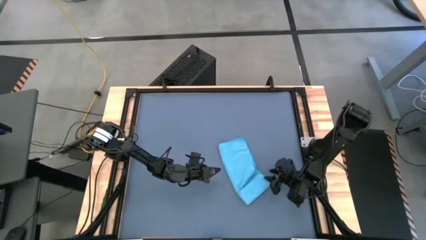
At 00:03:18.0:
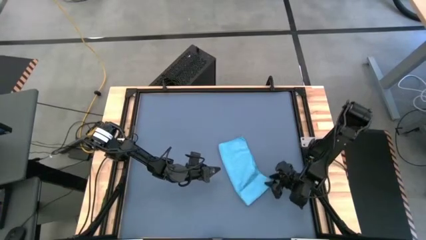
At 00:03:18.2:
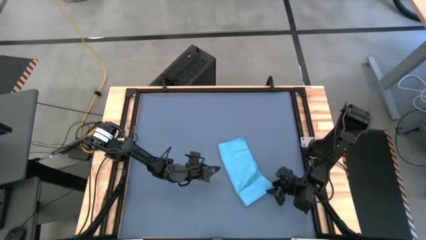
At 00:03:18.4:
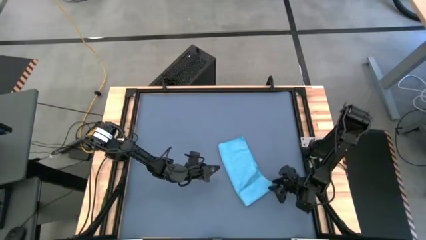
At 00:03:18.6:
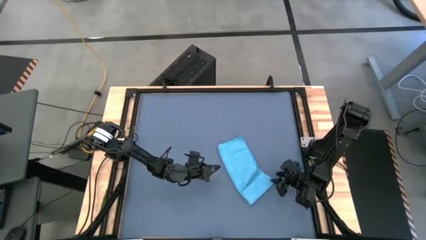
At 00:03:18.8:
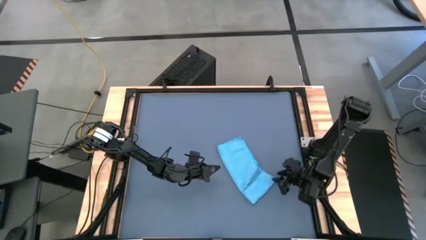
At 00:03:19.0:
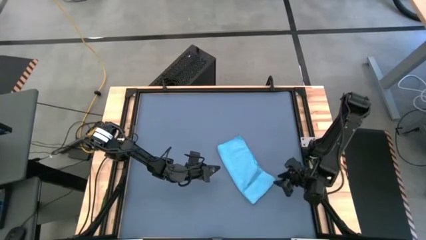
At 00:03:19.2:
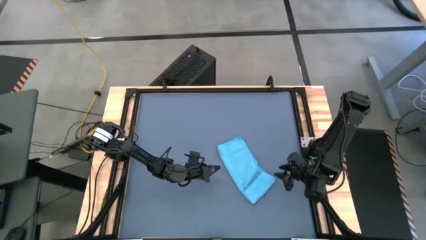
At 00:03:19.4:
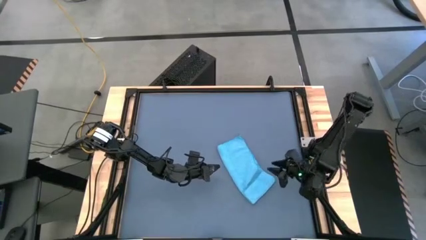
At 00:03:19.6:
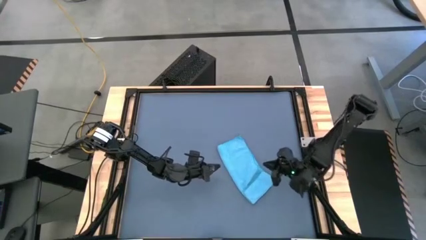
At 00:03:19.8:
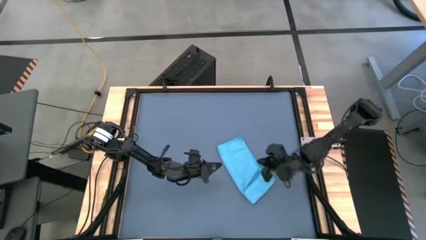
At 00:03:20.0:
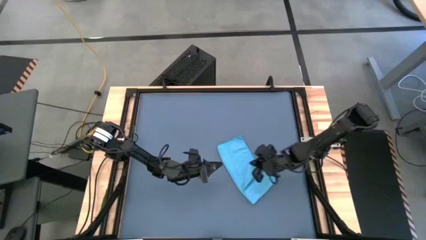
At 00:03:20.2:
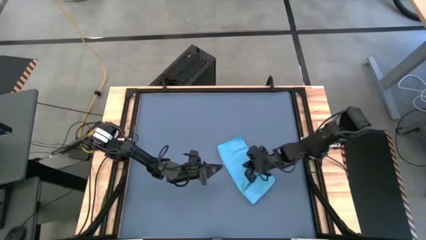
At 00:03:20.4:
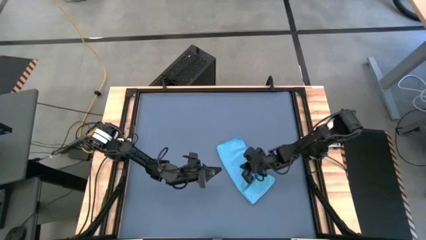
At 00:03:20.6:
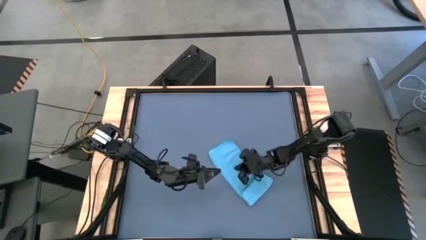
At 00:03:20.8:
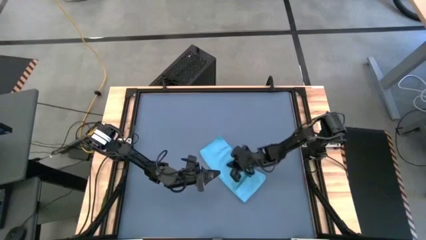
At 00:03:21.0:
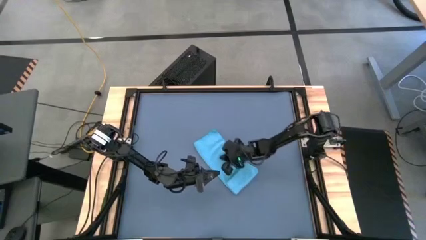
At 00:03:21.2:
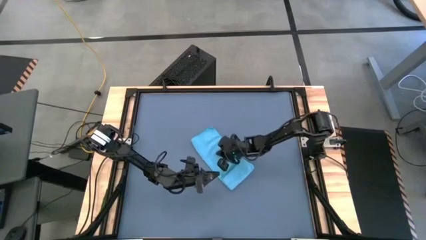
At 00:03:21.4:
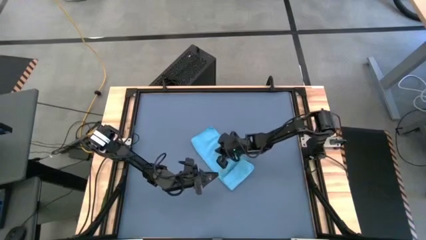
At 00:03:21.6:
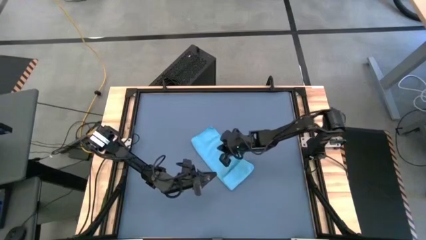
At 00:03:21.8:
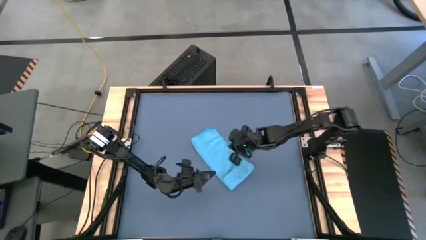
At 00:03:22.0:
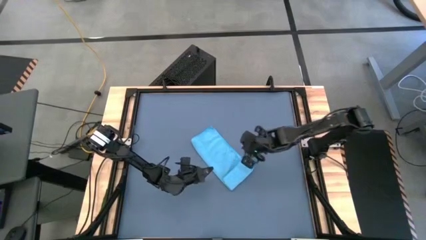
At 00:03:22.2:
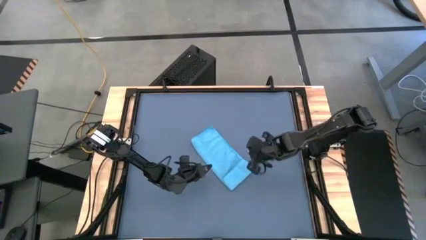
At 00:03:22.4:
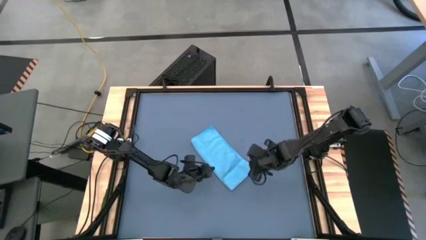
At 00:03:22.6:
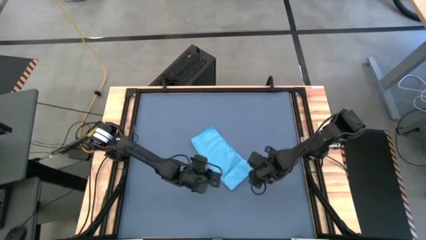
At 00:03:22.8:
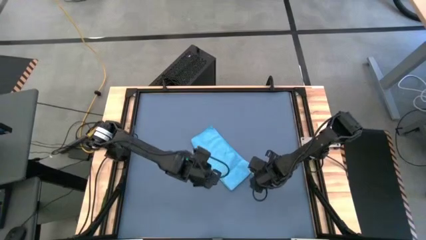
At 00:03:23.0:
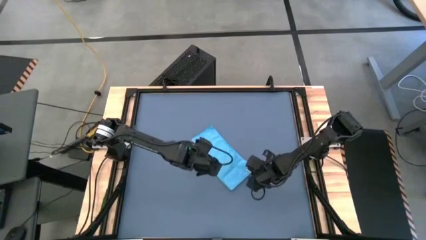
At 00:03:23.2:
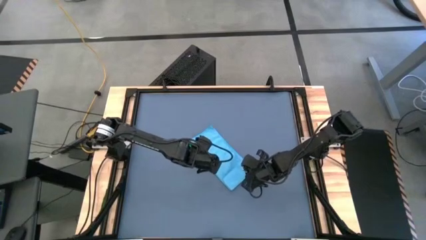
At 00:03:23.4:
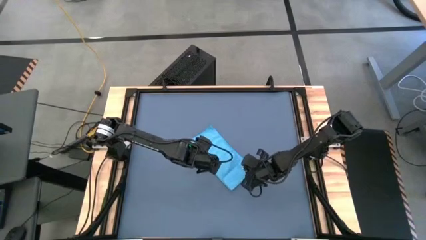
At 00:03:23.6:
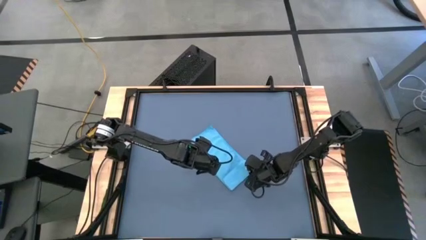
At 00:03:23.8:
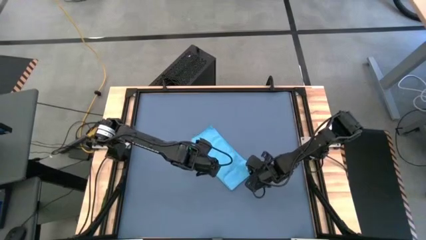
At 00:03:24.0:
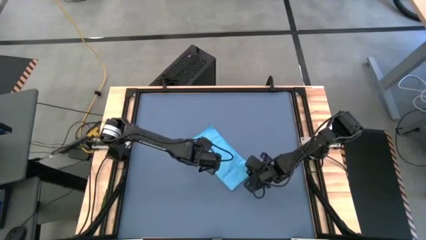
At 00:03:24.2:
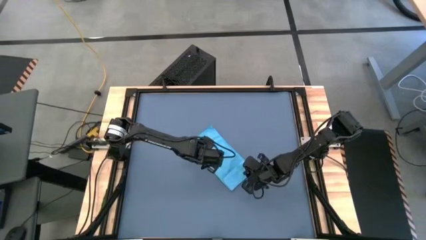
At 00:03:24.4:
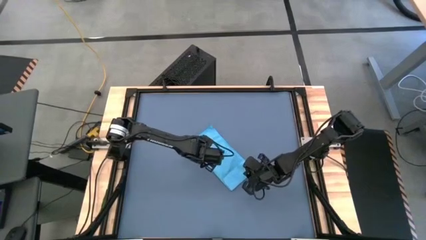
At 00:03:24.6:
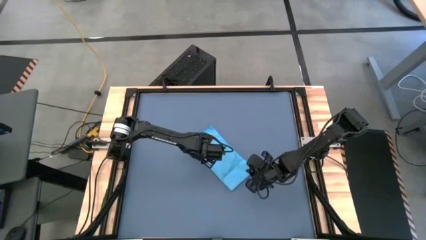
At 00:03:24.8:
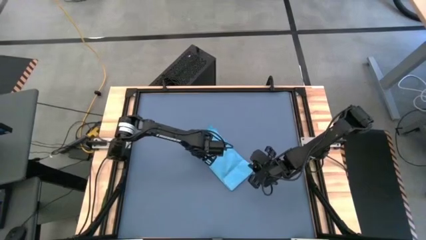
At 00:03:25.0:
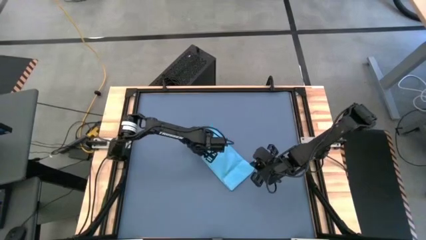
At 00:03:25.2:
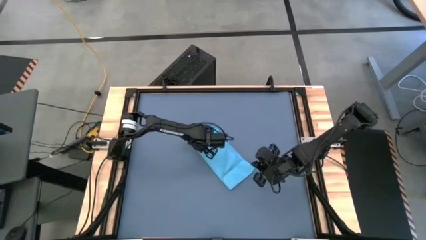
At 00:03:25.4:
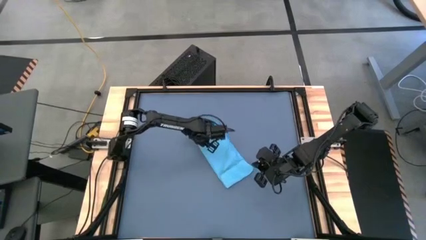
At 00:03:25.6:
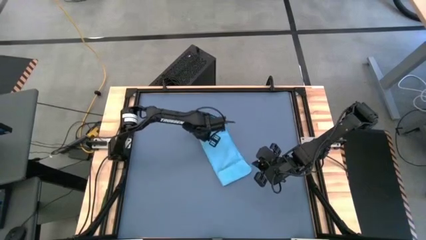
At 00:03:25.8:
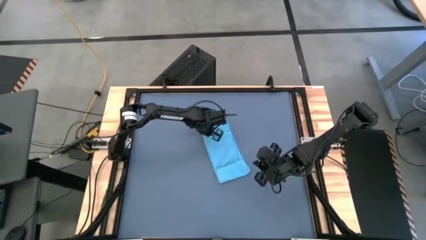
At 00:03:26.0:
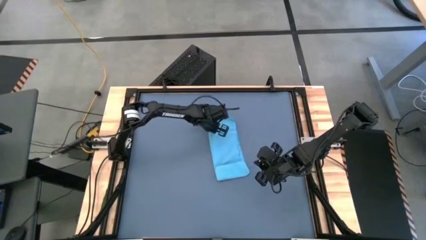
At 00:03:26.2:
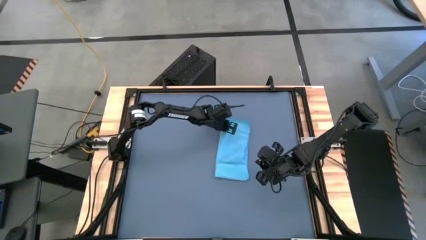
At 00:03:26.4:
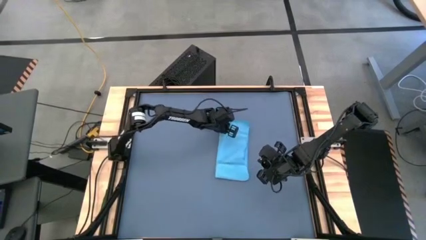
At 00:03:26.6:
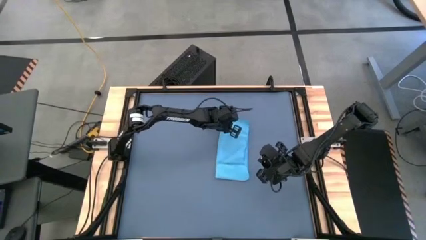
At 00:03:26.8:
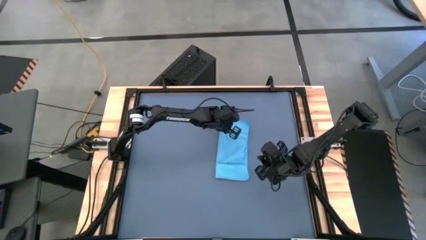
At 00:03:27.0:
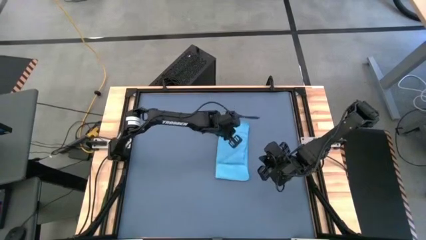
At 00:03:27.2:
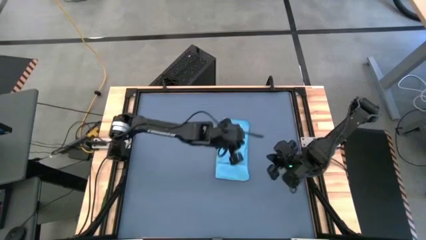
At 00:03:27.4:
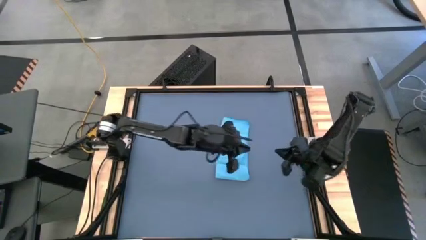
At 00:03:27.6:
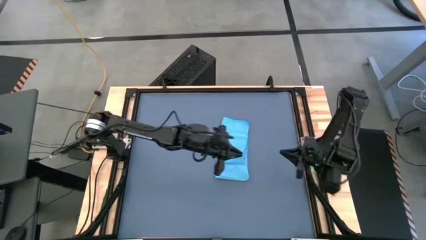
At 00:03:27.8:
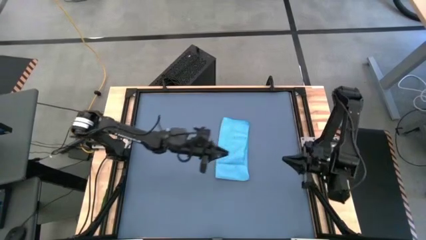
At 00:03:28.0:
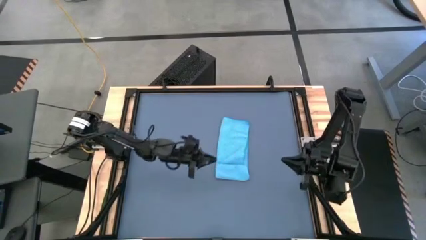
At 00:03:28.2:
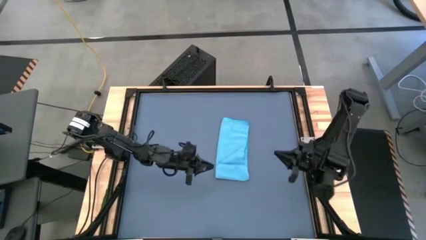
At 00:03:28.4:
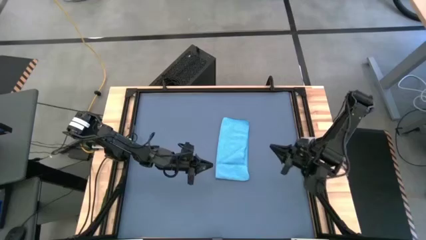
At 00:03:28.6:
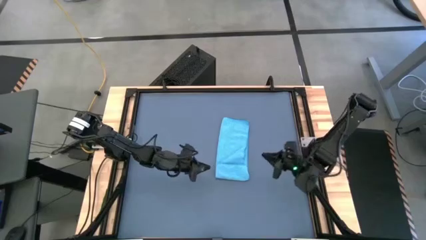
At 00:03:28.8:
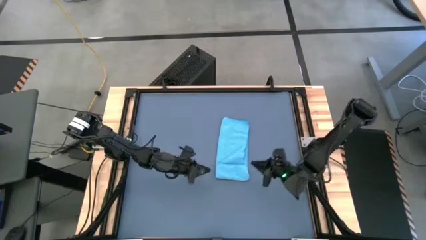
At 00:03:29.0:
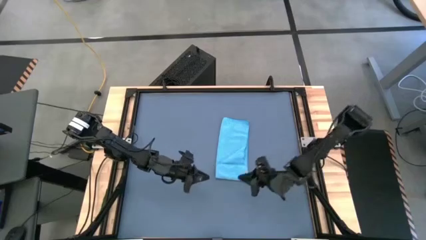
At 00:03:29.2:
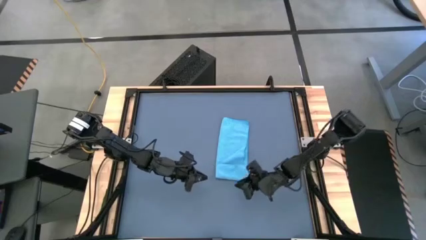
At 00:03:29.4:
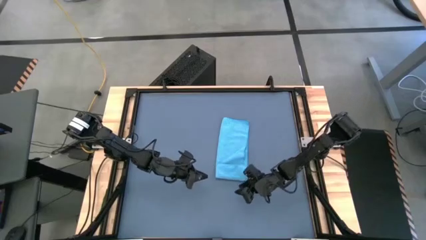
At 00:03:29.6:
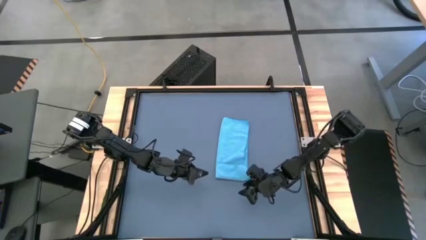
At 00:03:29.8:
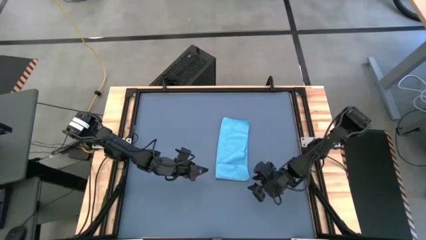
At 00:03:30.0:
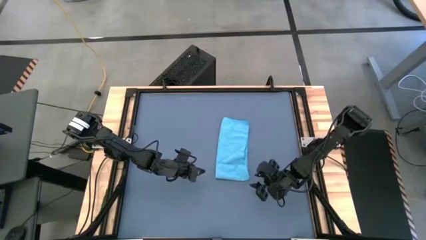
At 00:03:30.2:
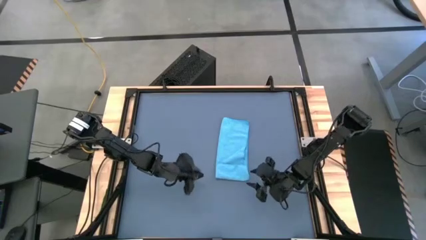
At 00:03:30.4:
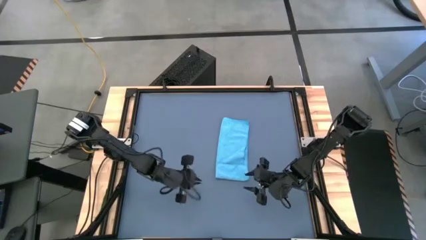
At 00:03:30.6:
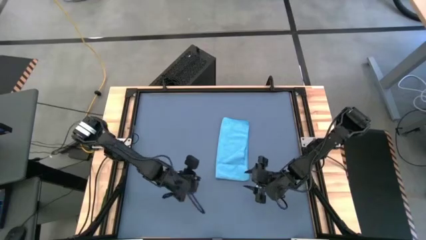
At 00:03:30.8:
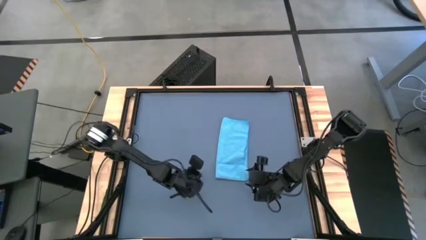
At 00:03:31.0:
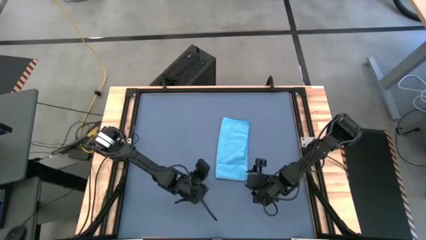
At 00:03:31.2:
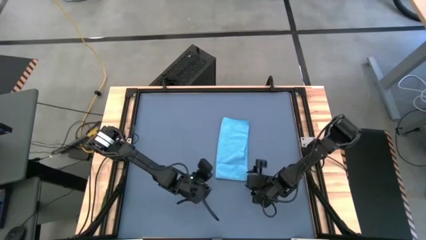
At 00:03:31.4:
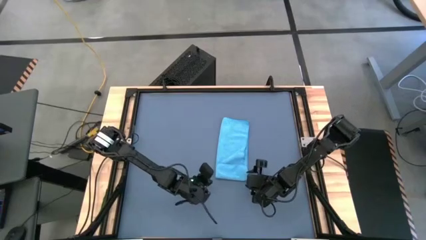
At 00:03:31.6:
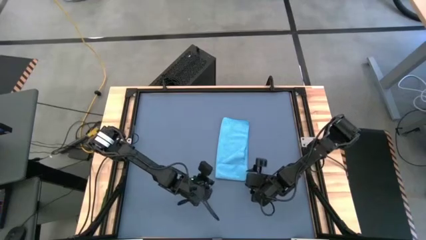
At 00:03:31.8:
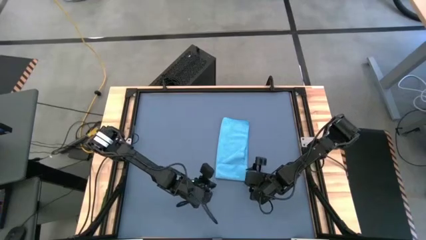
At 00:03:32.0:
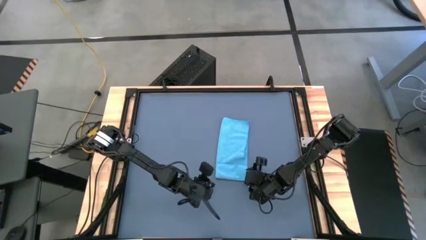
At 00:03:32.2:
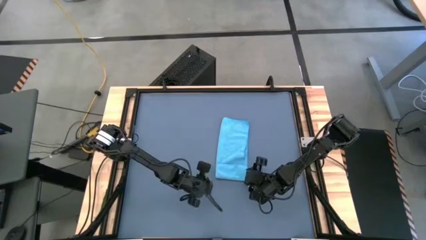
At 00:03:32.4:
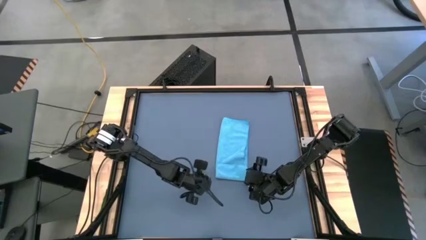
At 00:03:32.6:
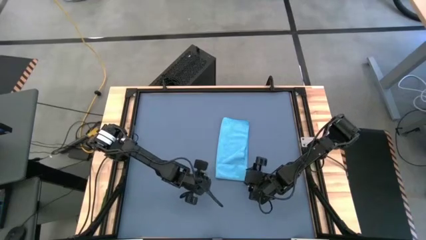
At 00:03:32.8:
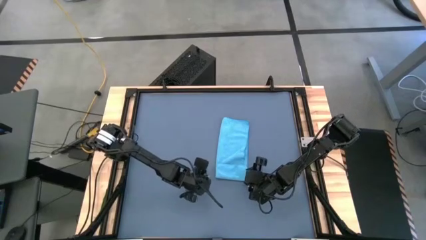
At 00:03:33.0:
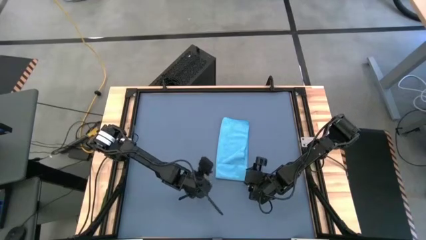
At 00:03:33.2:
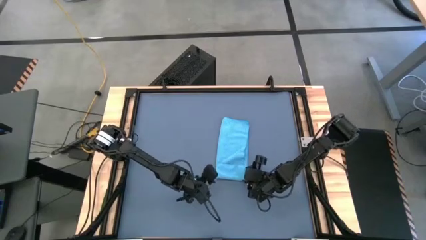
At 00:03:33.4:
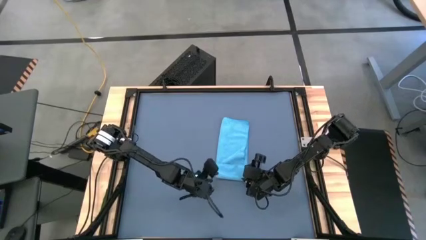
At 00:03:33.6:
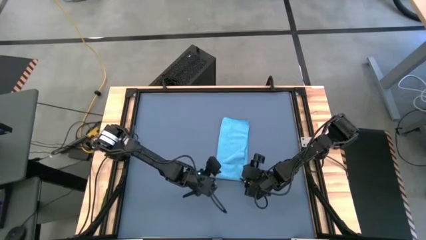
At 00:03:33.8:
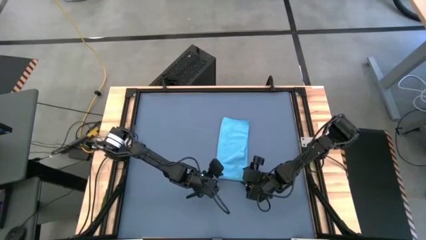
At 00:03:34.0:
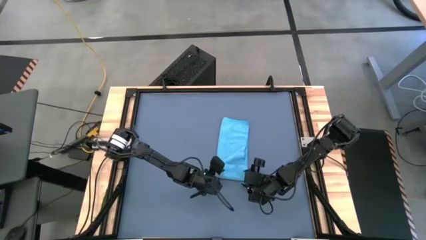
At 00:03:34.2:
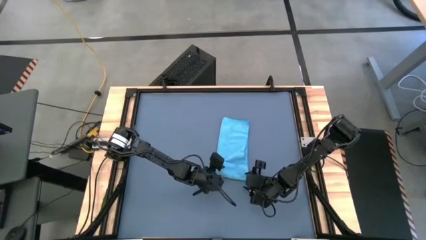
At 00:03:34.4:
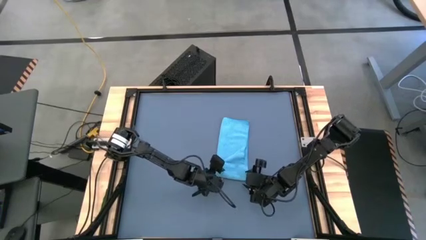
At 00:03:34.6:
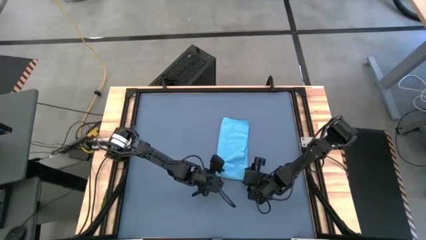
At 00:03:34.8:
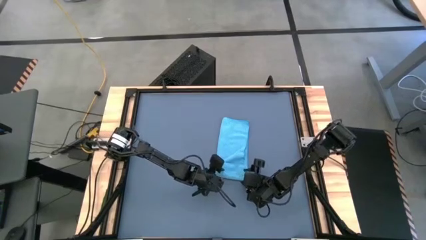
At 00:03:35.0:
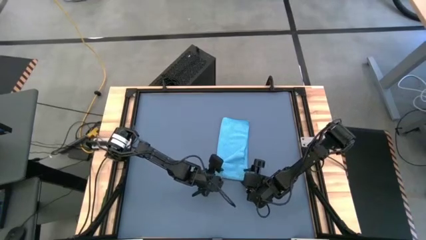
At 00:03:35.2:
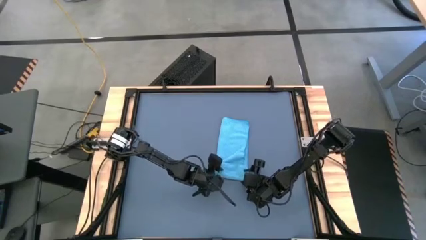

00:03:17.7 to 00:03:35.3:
Task: Roll towel
Roll the blue microfiber towel
